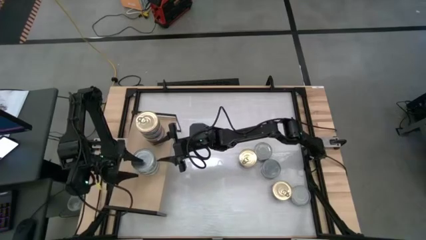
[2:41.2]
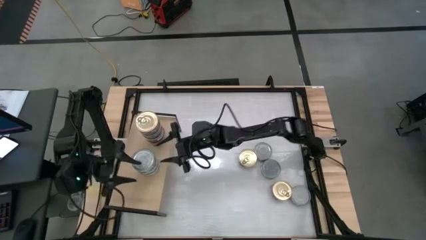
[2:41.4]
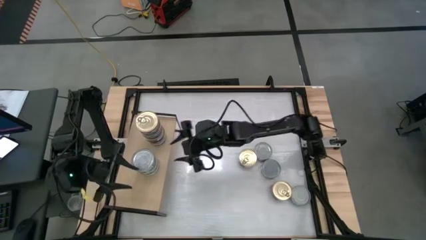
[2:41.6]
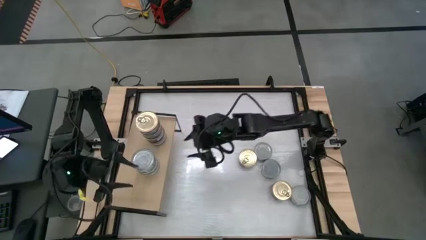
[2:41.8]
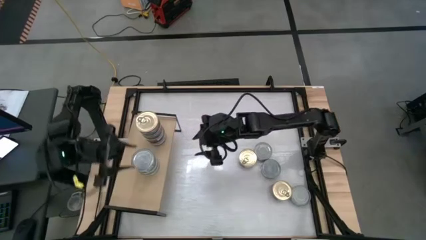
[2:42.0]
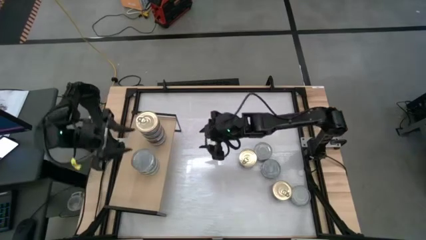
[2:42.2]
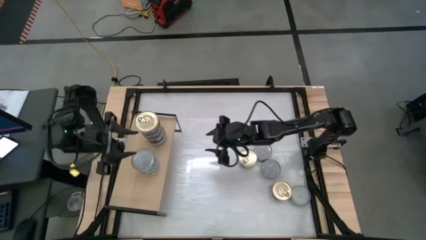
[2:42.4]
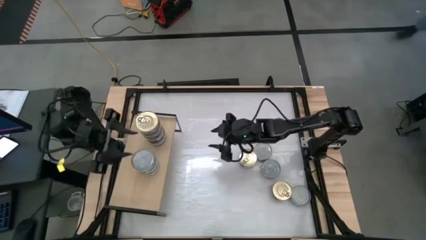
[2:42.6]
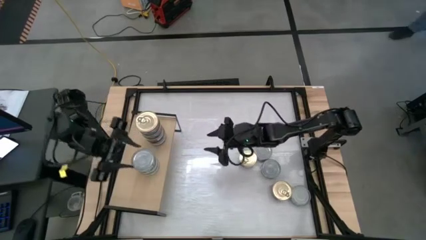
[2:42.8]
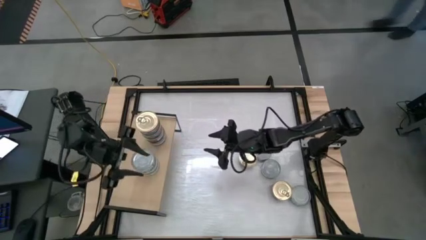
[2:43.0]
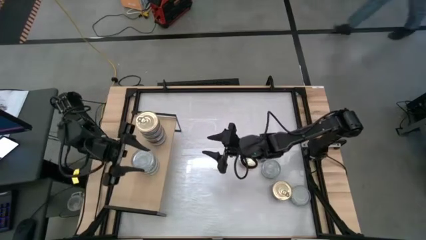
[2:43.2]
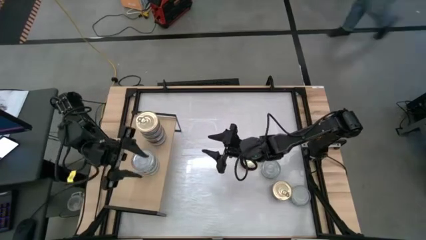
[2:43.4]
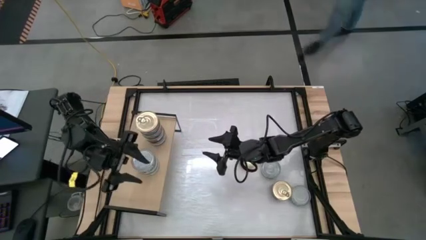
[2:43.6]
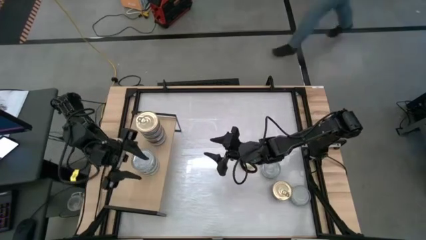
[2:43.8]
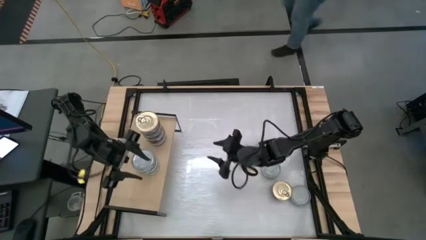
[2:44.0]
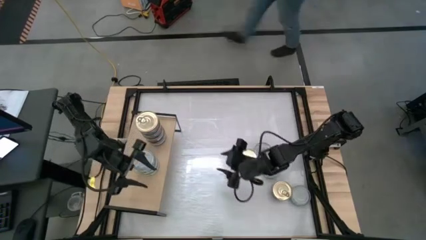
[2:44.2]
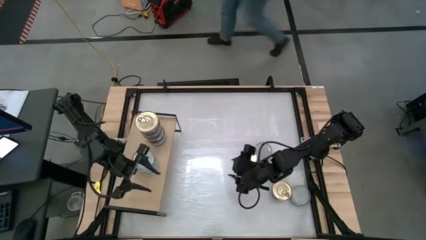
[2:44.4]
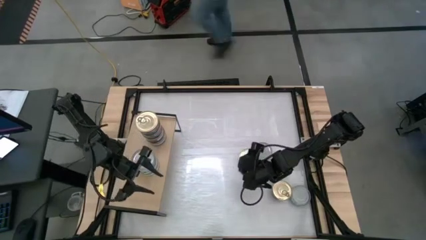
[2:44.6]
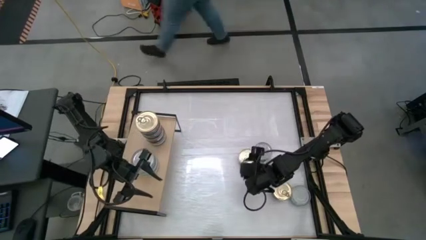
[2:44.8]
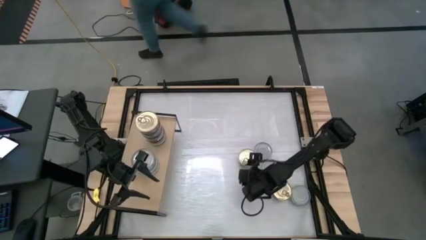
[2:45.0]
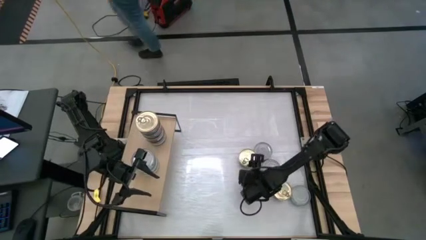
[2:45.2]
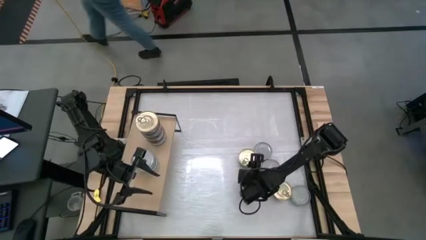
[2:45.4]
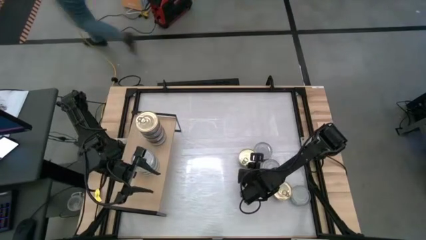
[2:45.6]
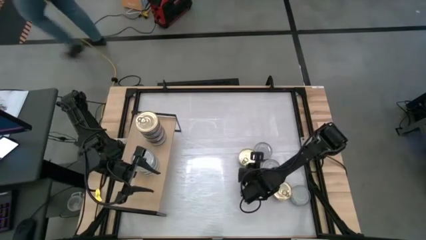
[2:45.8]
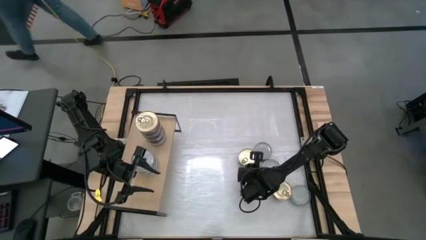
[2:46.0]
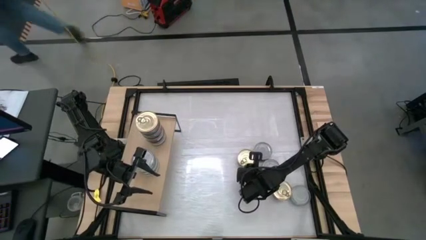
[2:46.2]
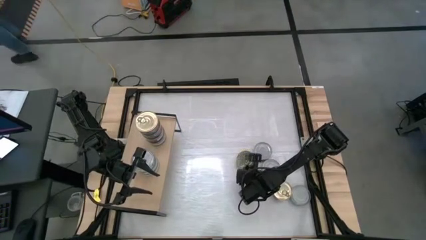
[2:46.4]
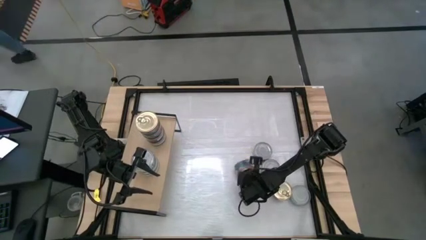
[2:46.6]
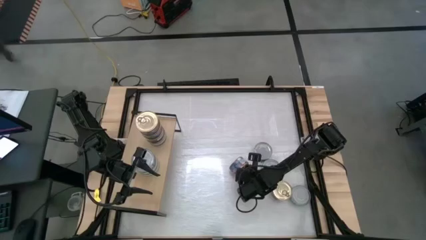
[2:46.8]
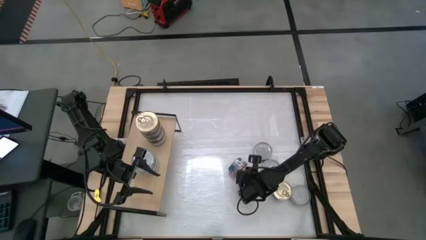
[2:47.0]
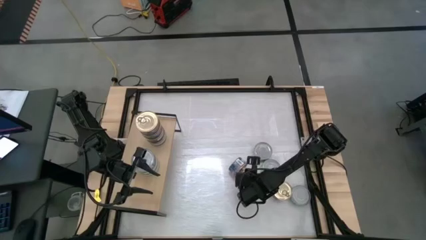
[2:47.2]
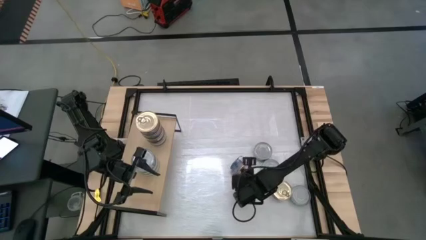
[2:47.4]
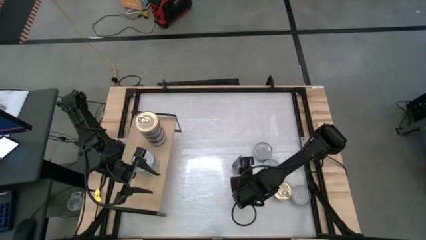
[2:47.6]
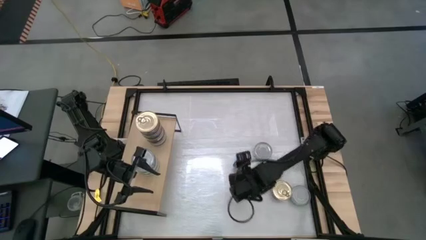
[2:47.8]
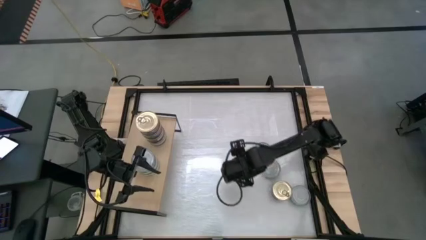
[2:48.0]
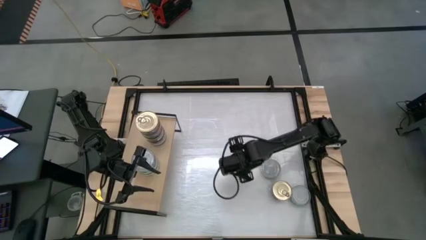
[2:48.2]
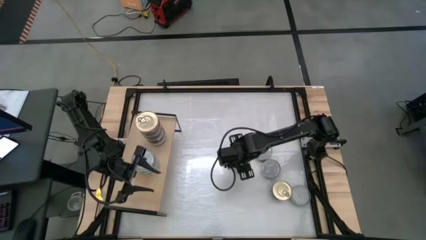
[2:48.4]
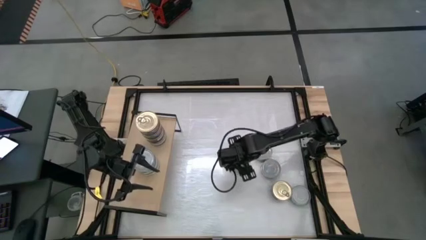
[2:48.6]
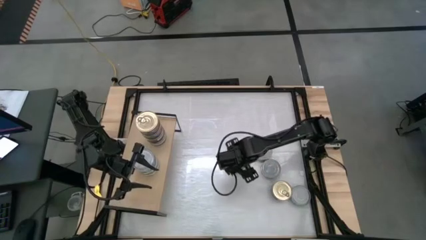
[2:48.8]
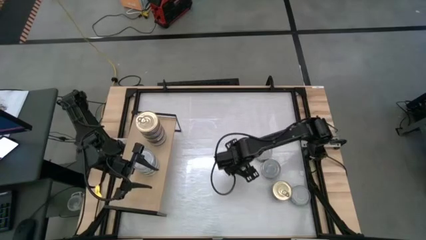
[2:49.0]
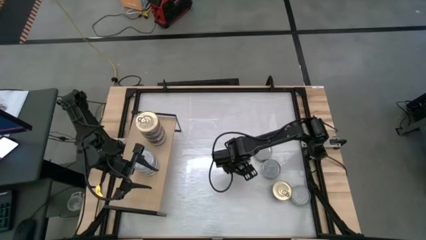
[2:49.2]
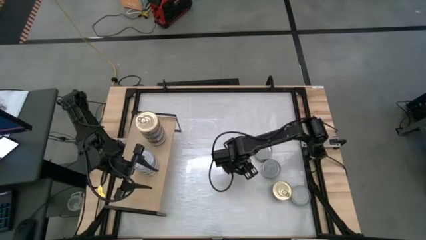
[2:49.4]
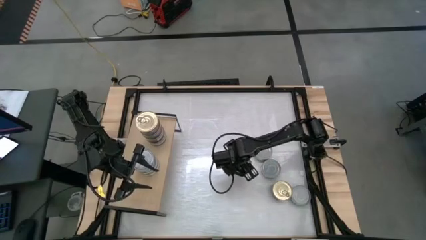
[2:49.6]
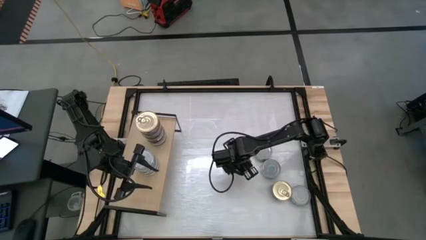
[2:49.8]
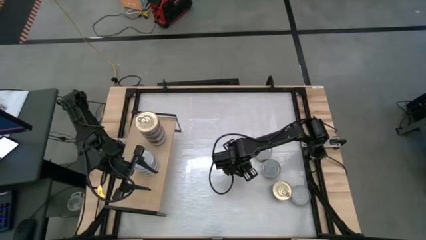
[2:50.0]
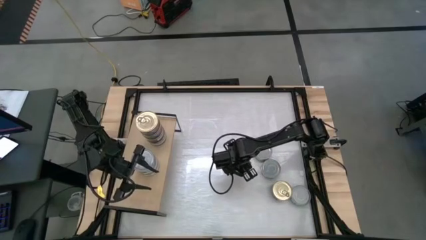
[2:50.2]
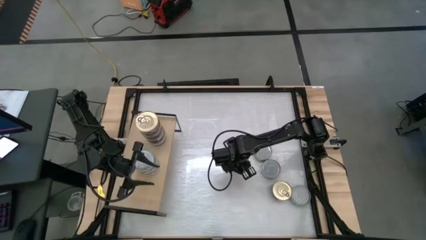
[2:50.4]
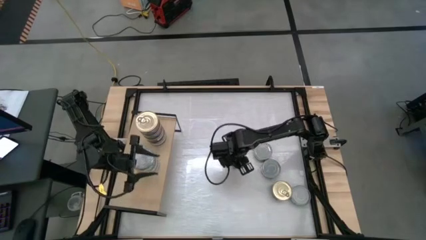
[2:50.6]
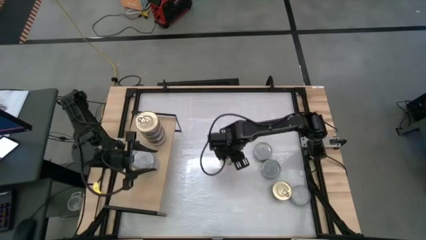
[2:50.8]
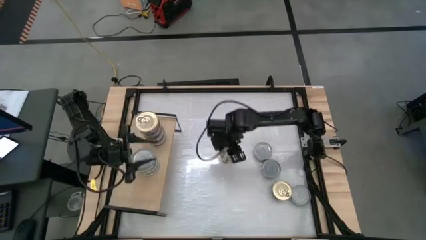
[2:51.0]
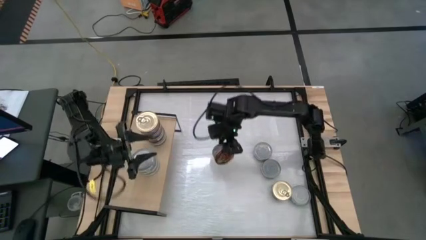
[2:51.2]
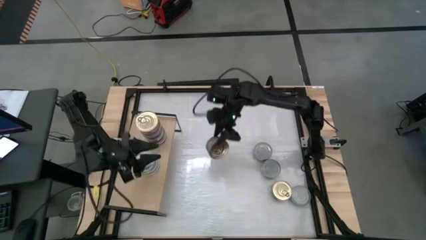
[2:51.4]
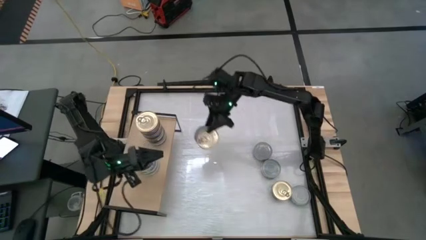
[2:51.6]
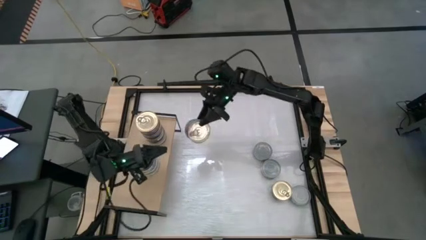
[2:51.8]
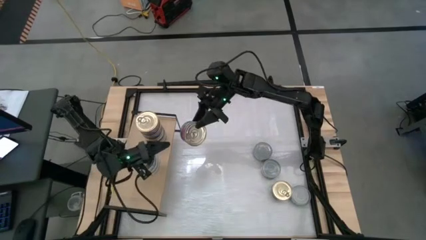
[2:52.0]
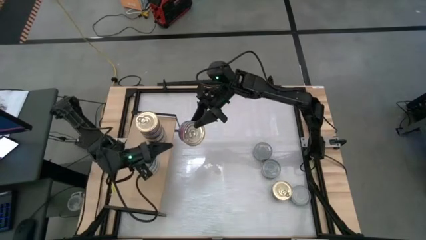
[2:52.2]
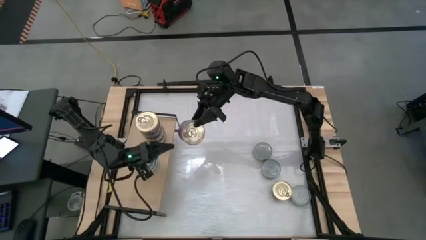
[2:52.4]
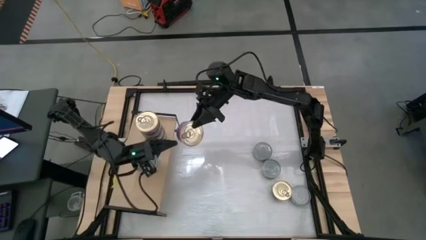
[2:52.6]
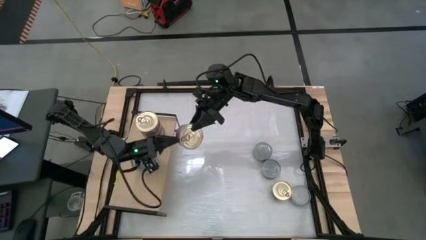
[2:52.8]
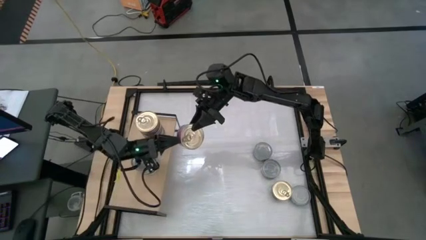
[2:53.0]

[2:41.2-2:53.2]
Task: Stack canned seafood by type on shelf
Stack the green tuna can on top of the green tuna can on the shelf

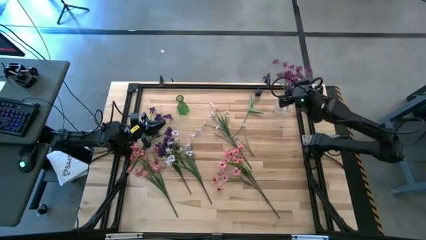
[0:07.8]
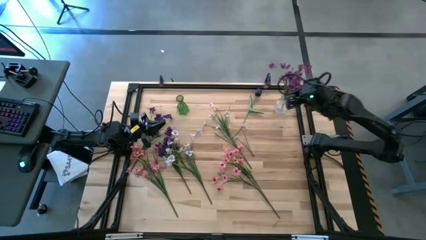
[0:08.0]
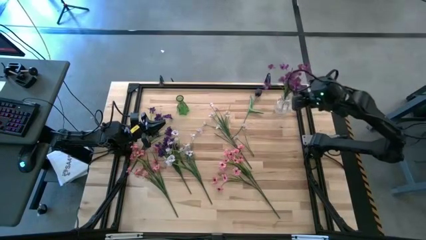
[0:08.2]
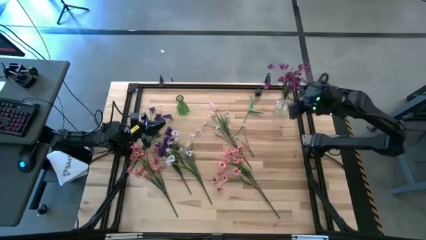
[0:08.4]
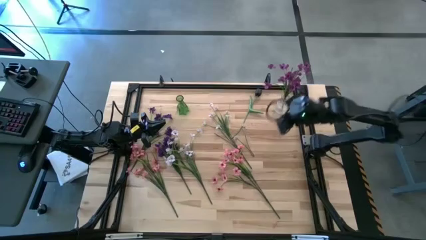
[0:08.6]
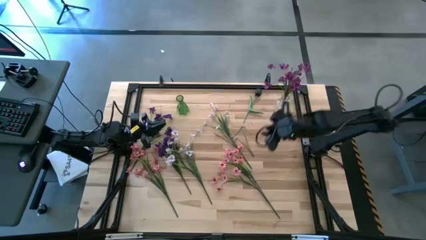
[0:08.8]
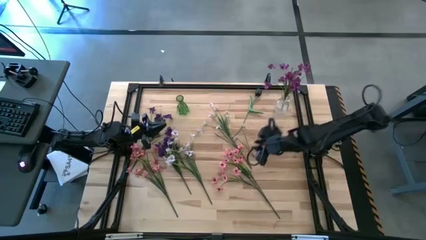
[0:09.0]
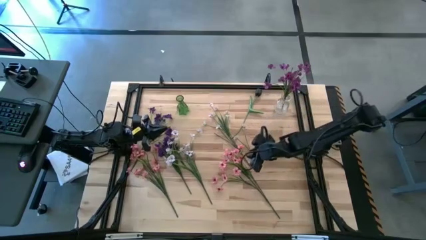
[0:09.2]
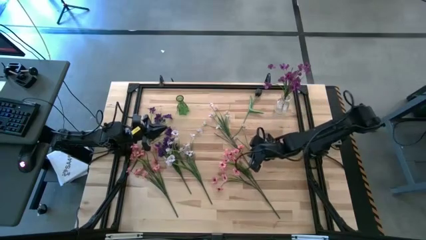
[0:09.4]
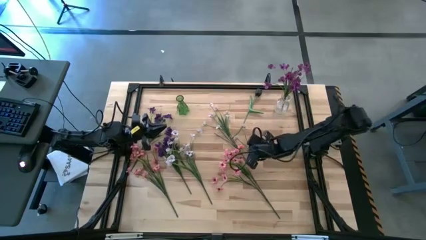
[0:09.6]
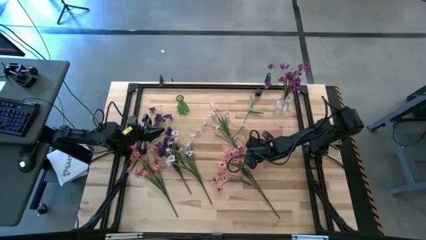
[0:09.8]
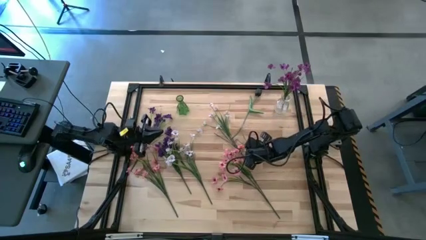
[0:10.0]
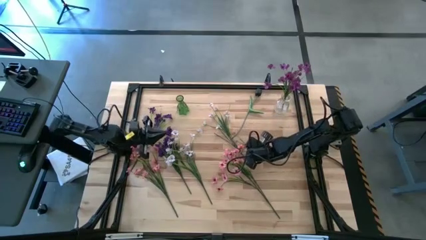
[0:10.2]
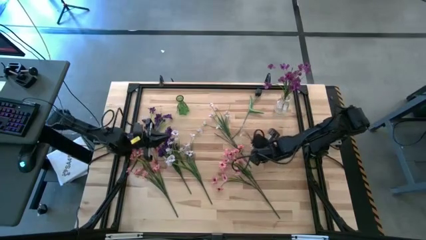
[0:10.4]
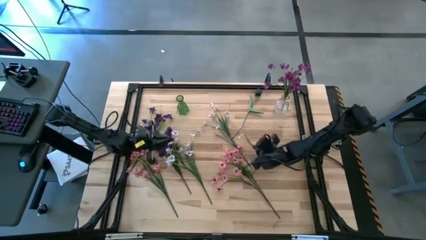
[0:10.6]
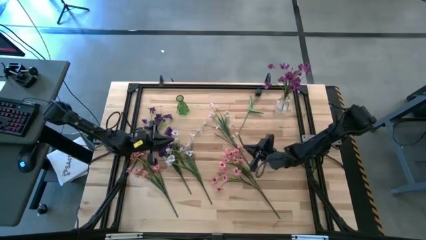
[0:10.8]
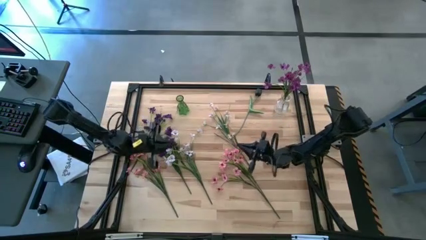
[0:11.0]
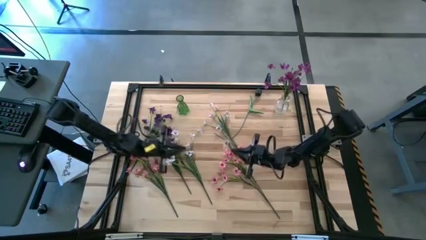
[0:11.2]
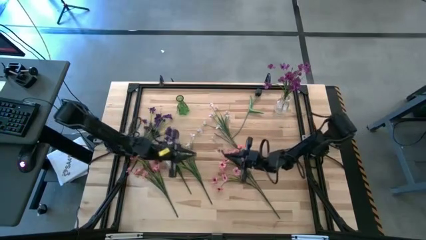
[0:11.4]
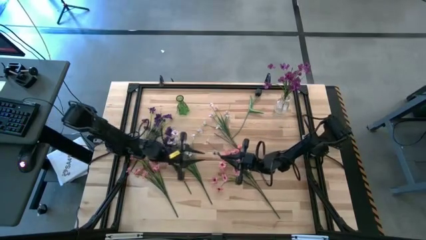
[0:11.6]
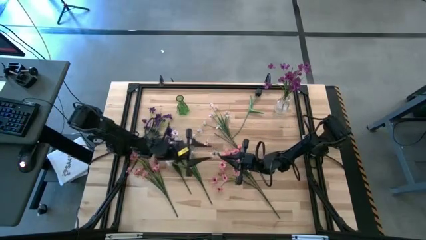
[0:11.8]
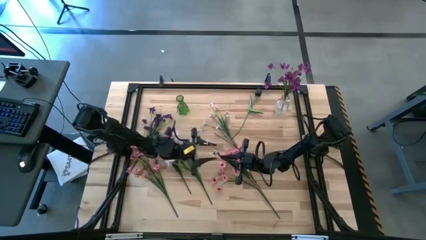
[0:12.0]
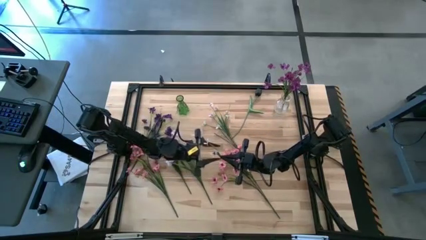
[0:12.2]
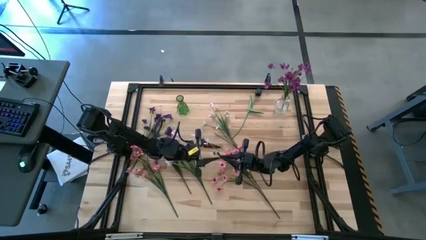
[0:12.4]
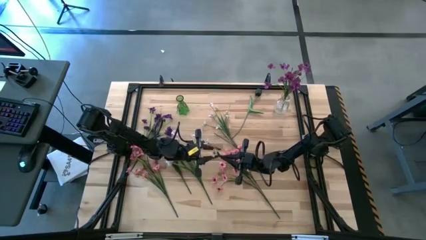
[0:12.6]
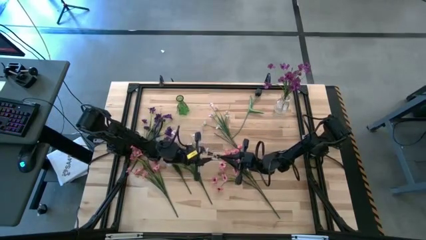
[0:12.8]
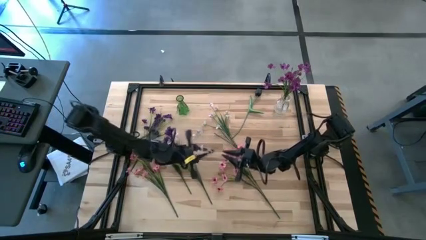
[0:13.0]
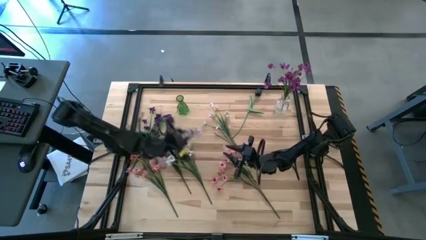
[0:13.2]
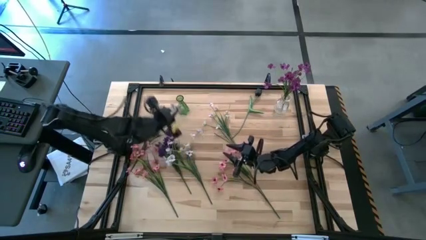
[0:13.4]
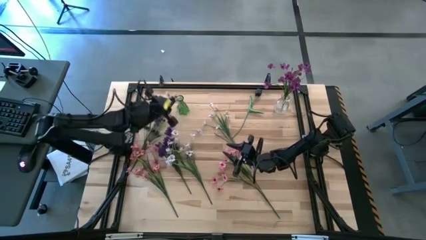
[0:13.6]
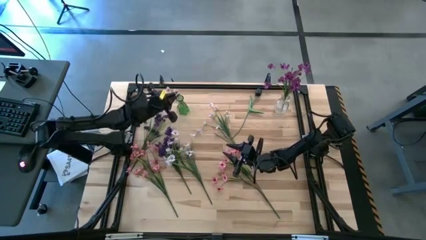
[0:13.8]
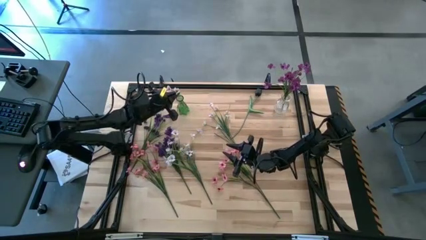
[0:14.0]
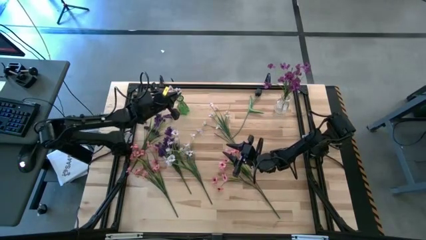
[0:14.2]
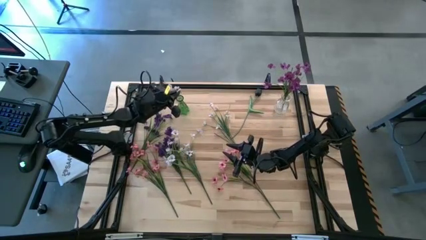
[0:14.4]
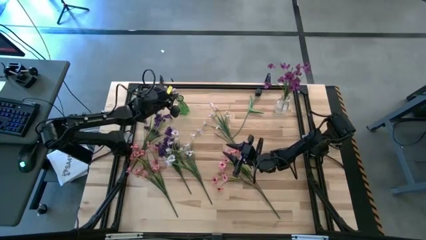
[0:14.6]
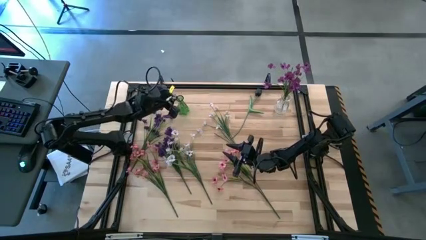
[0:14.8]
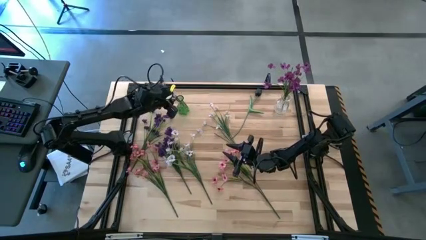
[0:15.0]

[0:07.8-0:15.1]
Task: Sort flowers into vase by color
Put the middle right white flowers into the green vase
